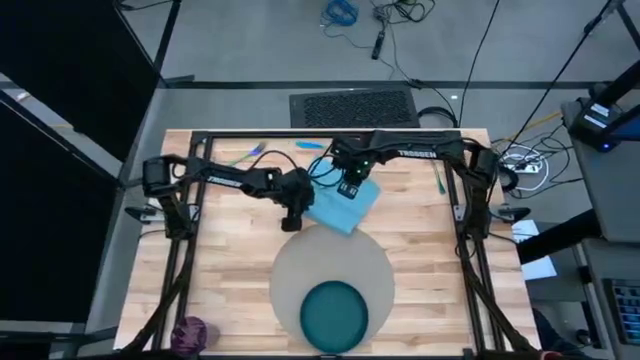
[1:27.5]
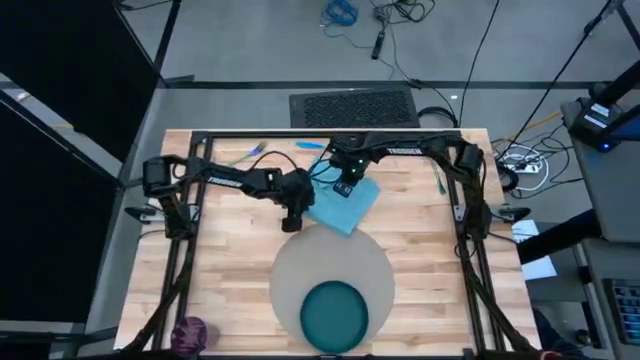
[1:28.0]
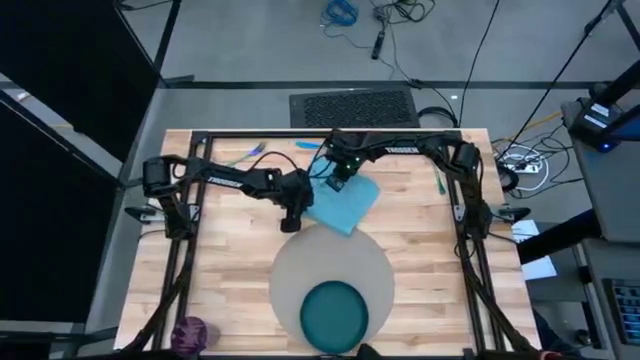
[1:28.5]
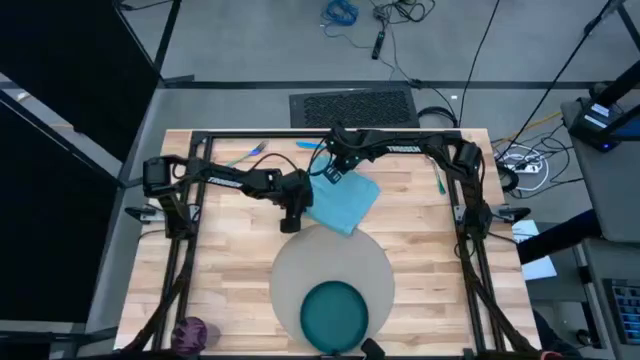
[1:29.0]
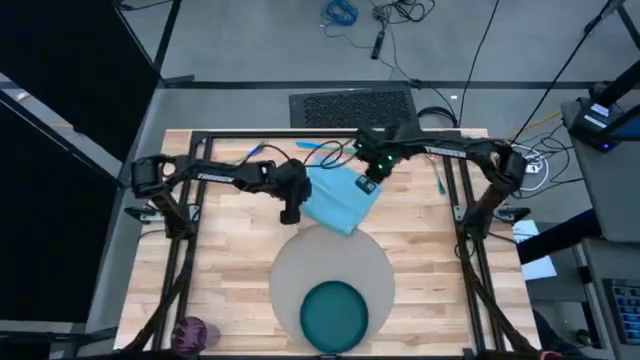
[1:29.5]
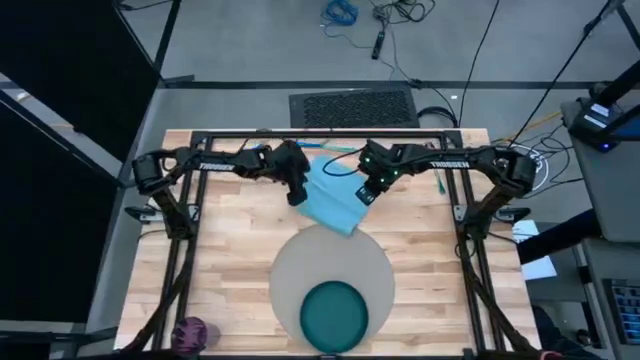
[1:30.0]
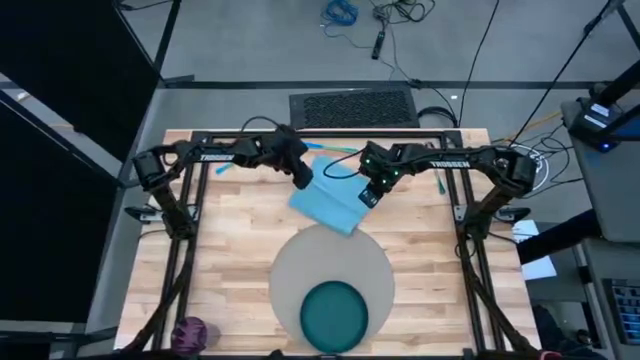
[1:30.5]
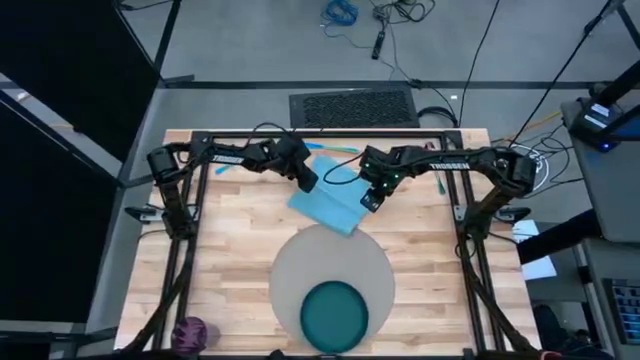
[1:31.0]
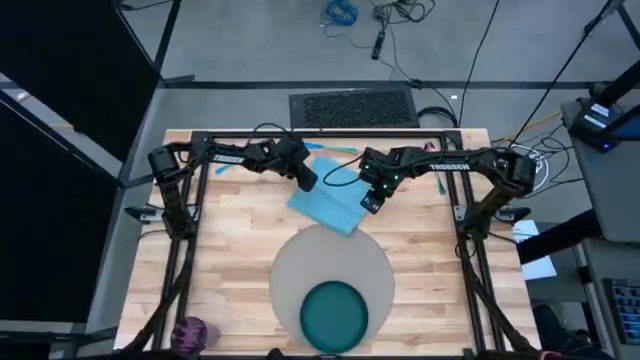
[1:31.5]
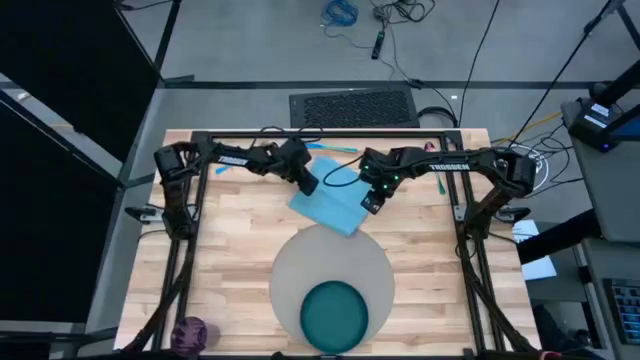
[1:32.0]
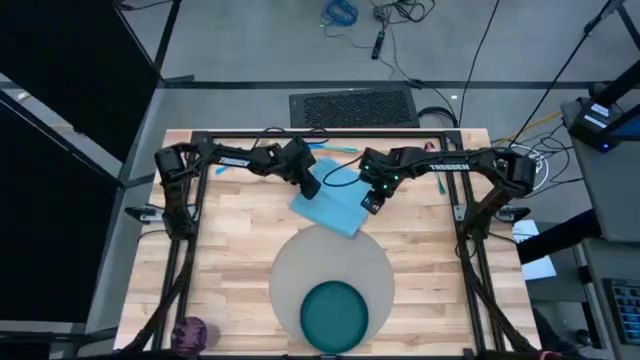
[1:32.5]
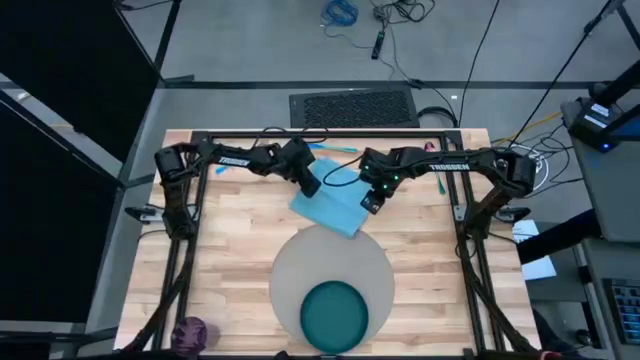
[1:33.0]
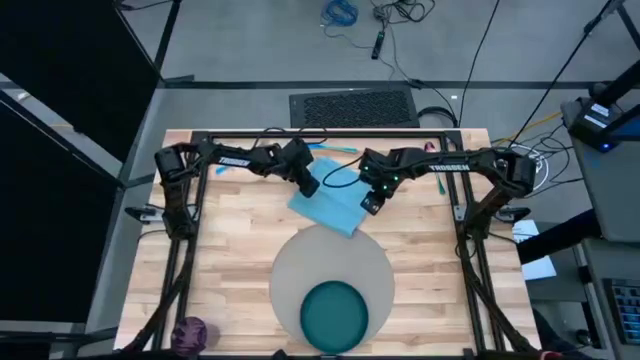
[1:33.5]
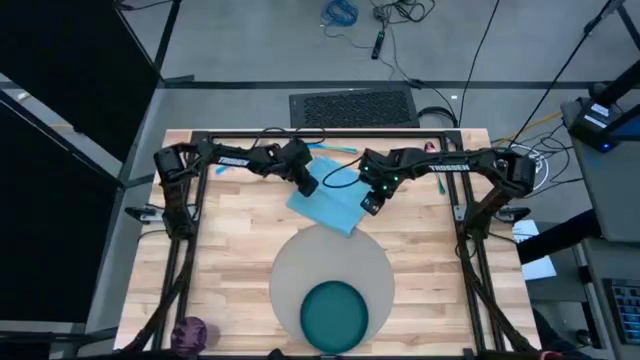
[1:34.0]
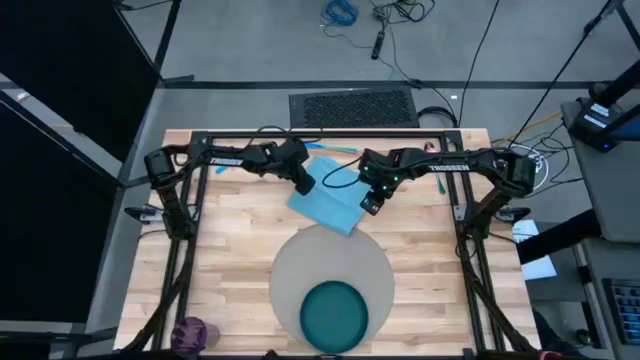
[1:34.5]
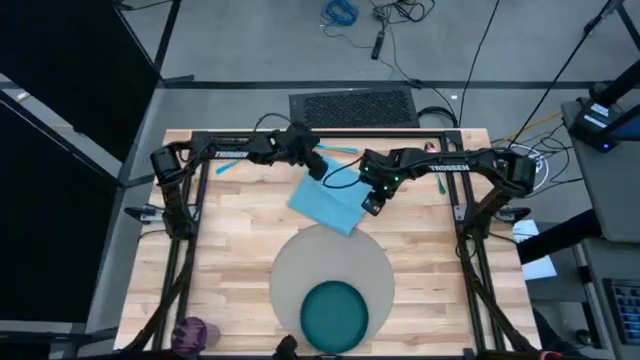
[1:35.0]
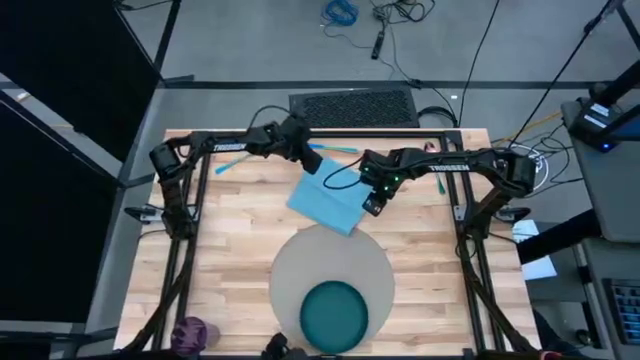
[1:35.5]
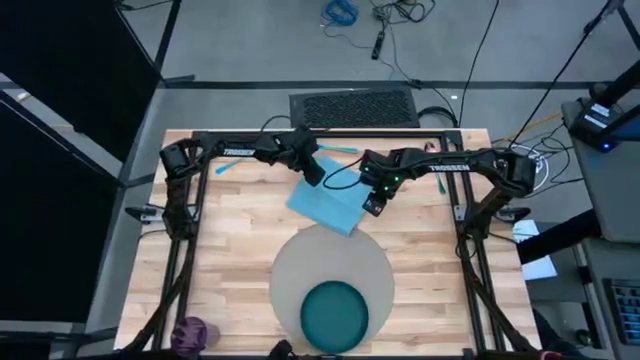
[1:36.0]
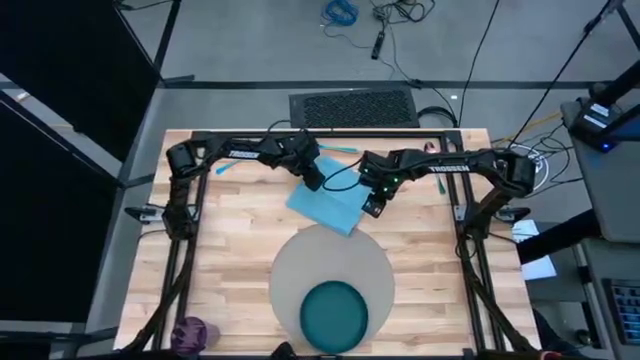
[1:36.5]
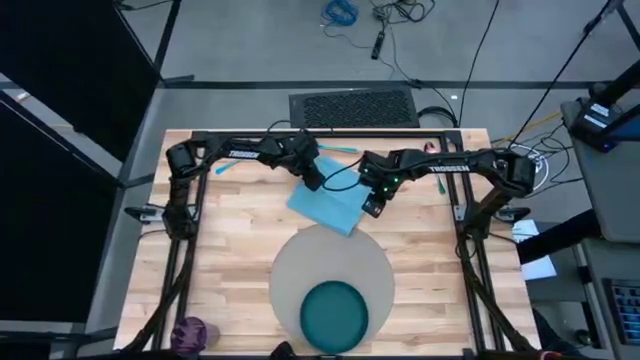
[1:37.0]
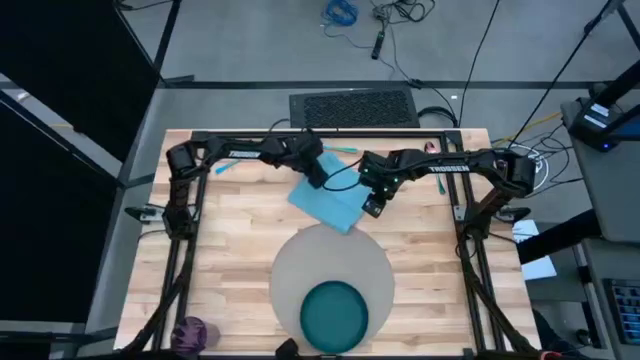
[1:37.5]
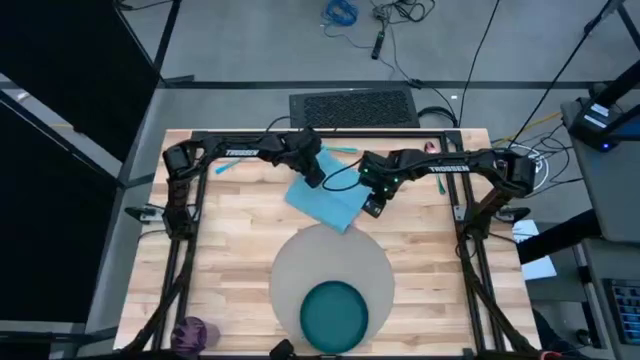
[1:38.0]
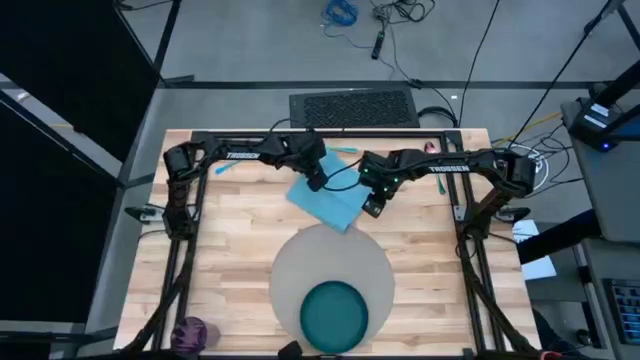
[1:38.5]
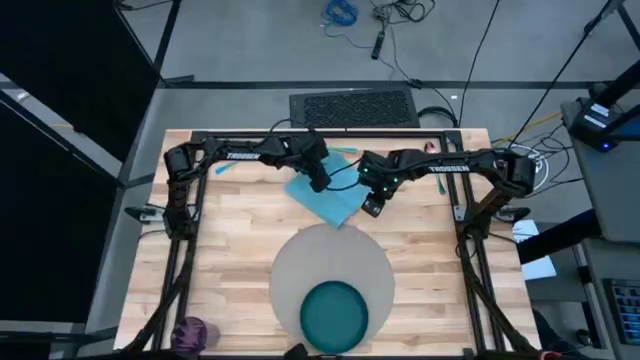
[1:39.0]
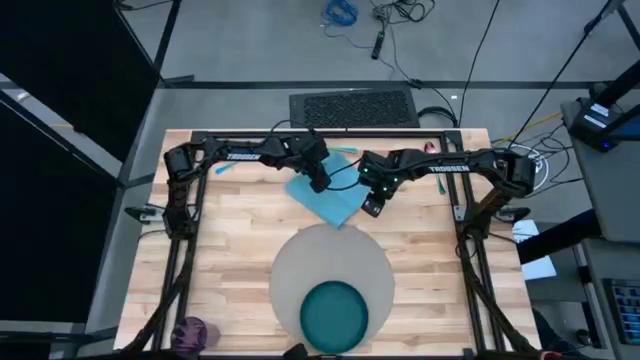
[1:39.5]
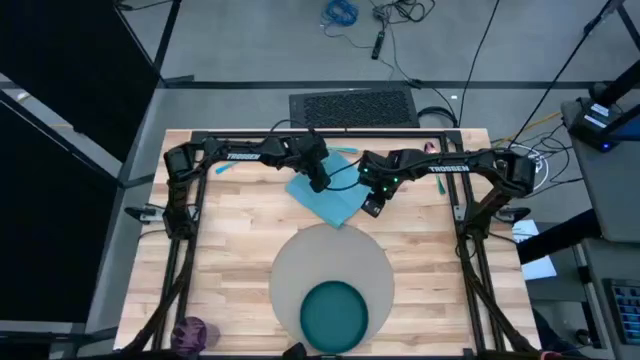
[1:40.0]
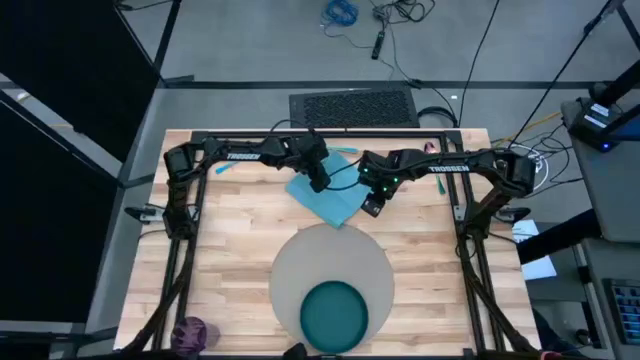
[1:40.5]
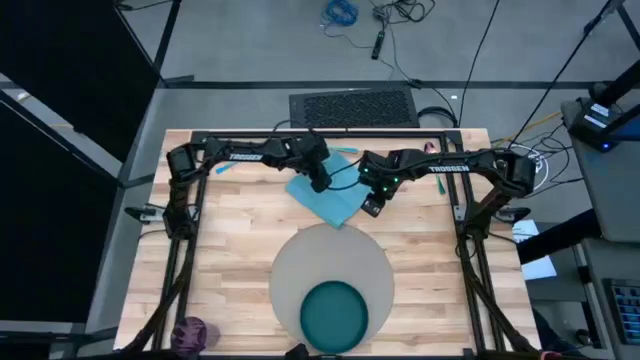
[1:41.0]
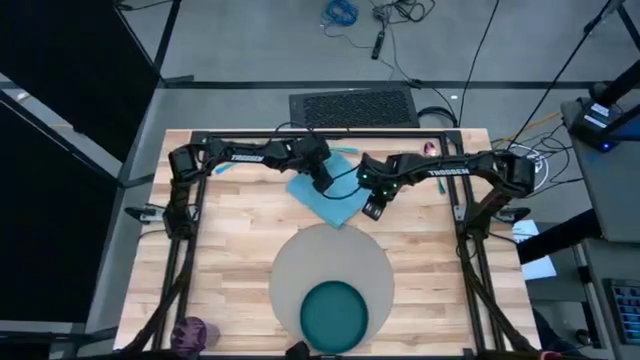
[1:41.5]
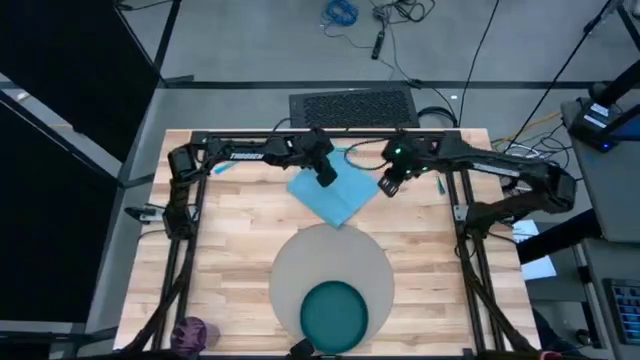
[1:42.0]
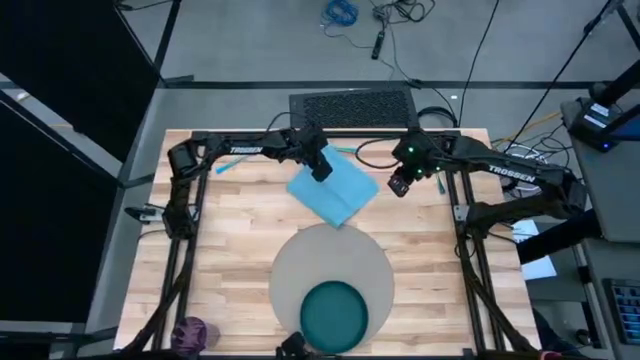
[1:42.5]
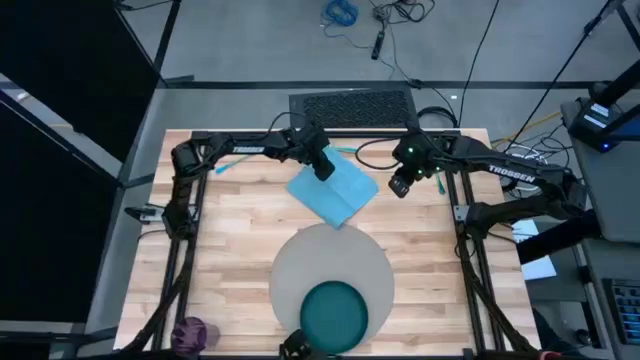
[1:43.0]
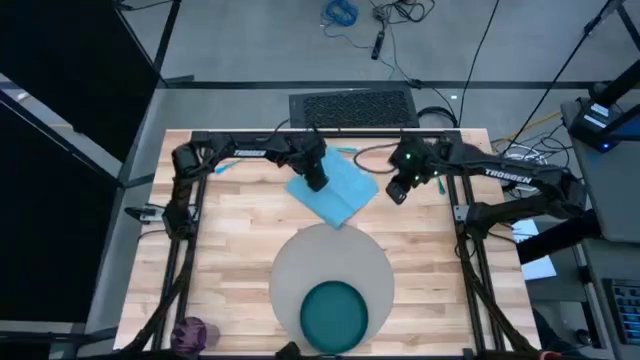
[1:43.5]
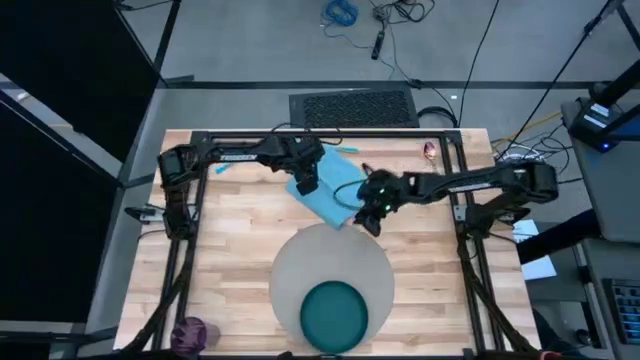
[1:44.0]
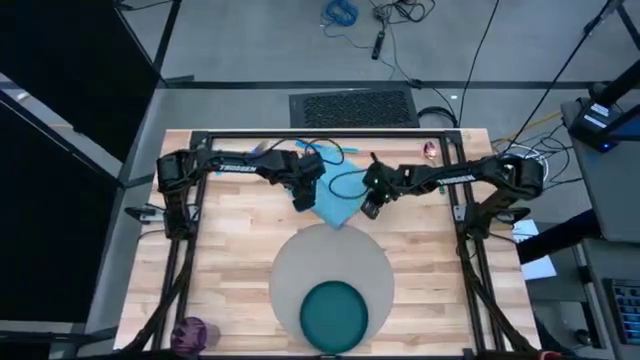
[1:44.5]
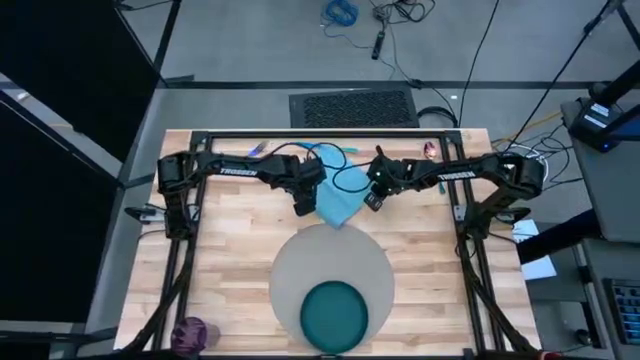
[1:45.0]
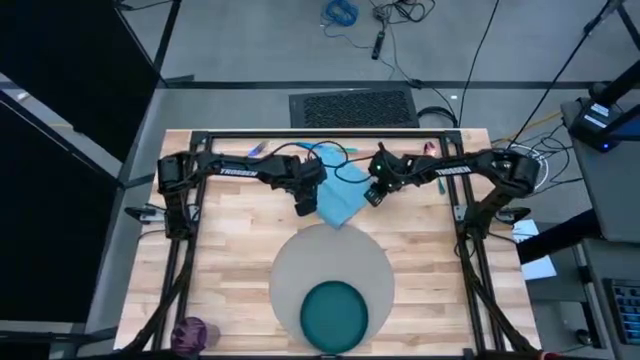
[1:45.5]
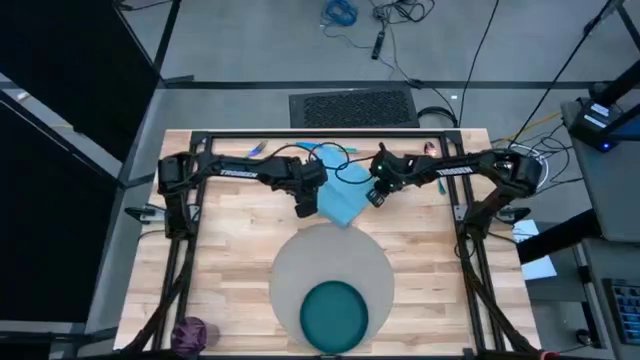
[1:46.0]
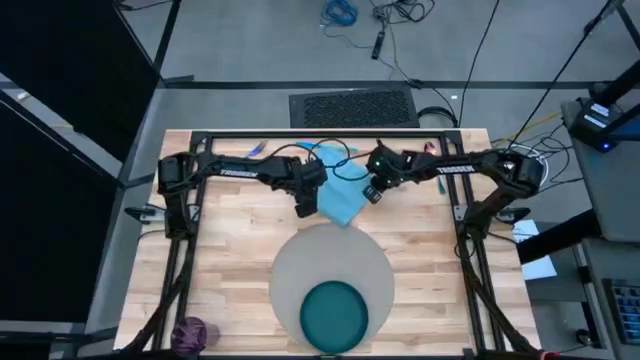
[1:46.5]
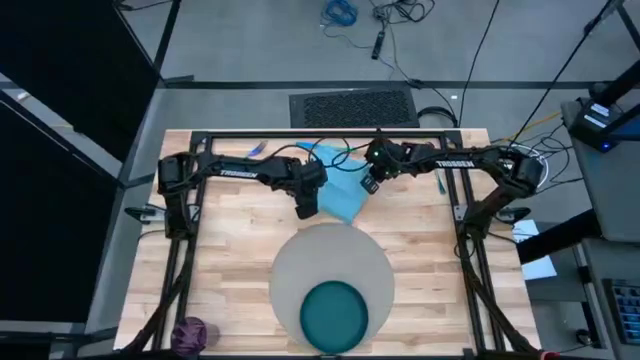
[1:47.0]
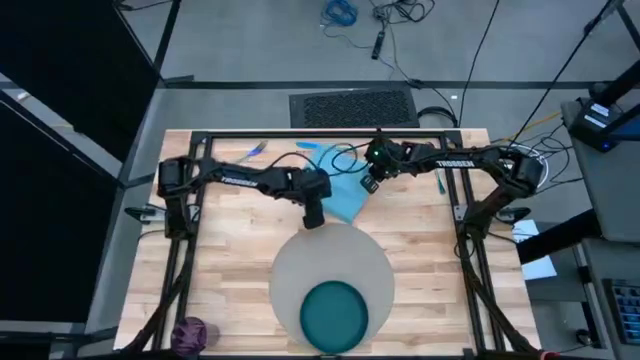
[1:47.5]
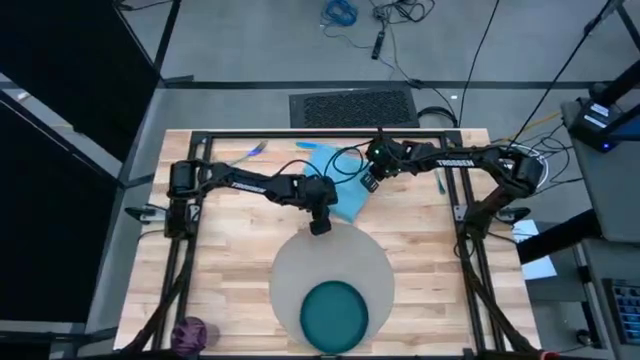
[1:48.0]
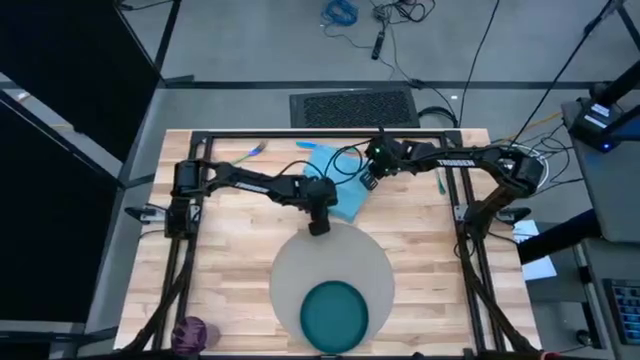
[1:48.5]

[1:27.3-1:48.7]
Task: Set table place
Fold the blue napkin
